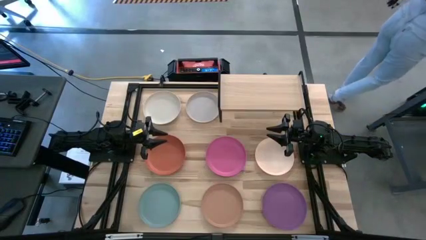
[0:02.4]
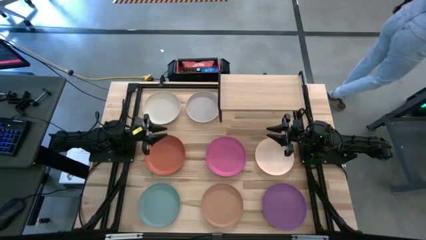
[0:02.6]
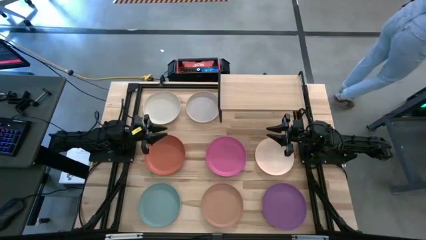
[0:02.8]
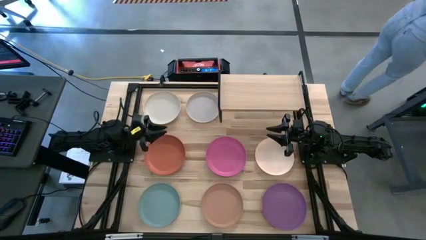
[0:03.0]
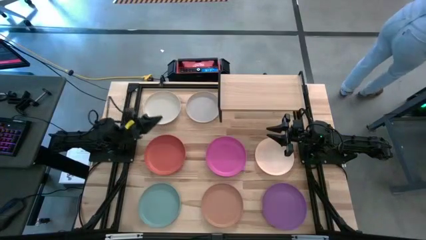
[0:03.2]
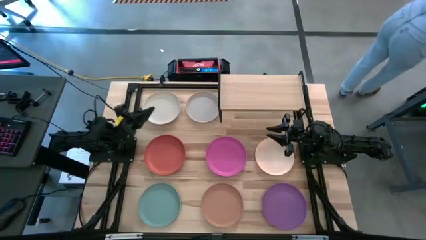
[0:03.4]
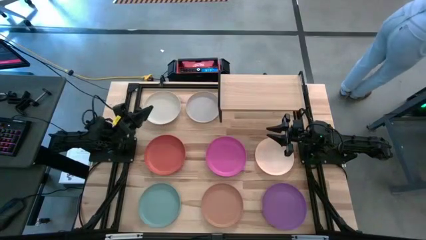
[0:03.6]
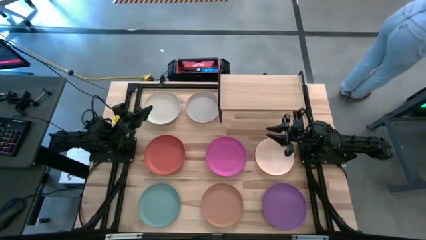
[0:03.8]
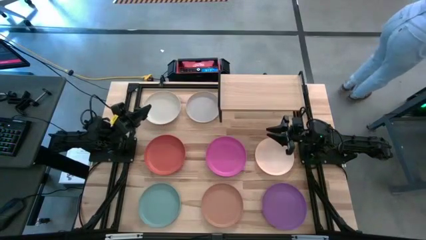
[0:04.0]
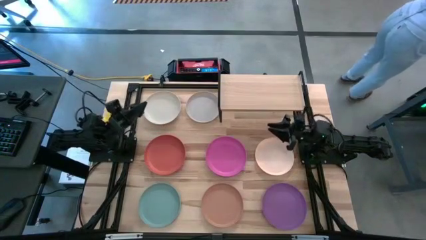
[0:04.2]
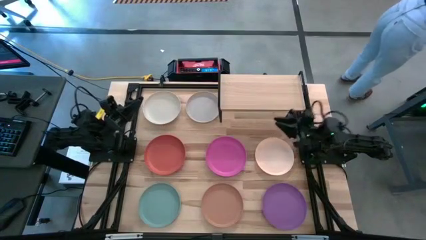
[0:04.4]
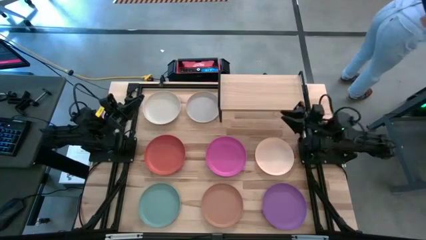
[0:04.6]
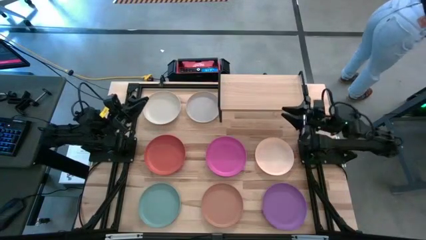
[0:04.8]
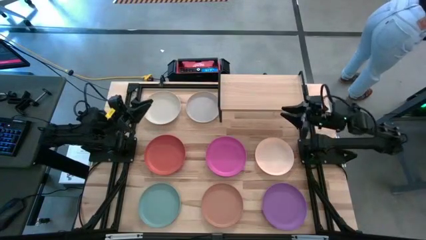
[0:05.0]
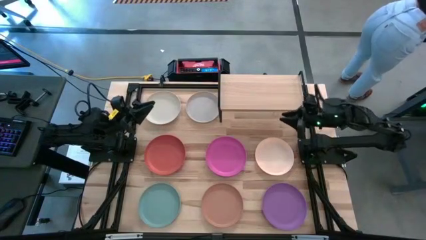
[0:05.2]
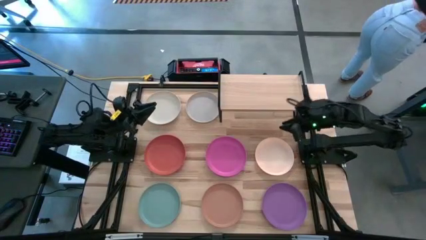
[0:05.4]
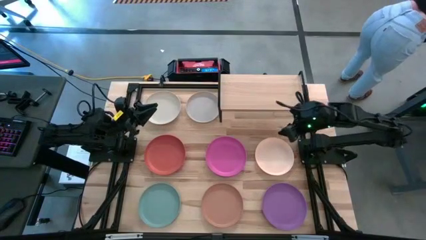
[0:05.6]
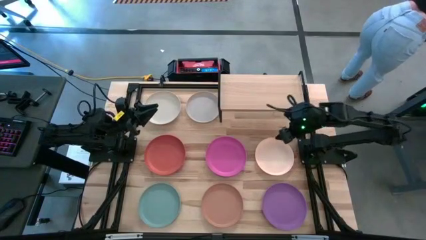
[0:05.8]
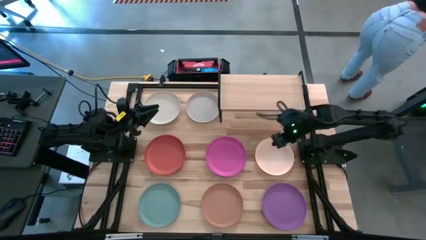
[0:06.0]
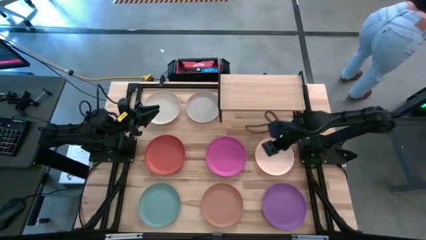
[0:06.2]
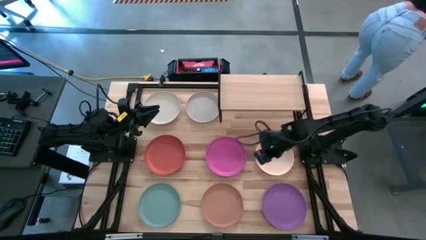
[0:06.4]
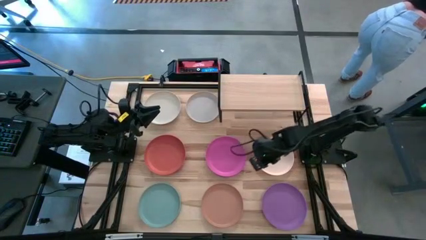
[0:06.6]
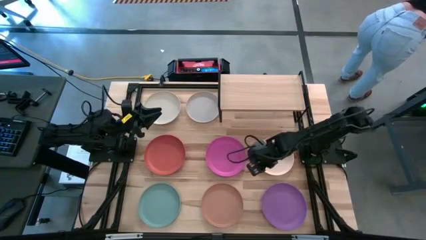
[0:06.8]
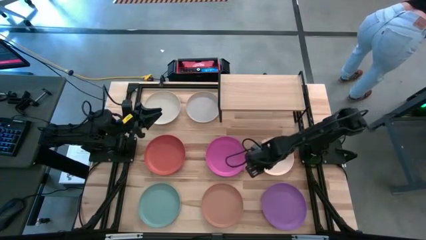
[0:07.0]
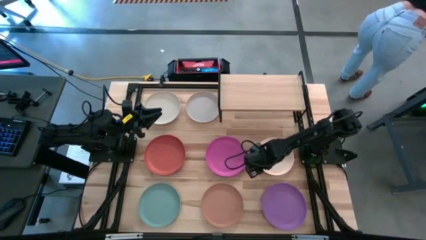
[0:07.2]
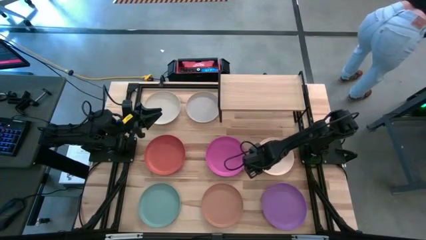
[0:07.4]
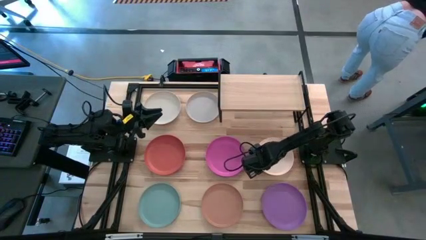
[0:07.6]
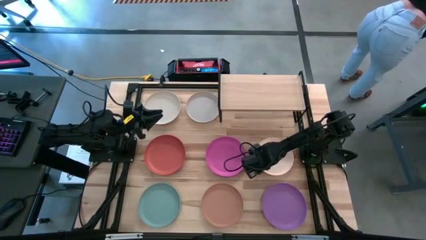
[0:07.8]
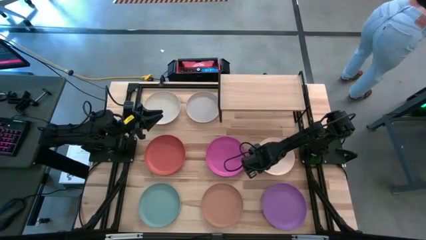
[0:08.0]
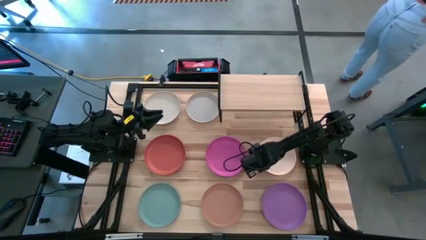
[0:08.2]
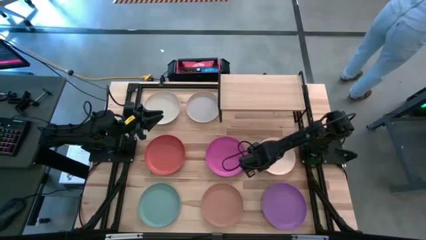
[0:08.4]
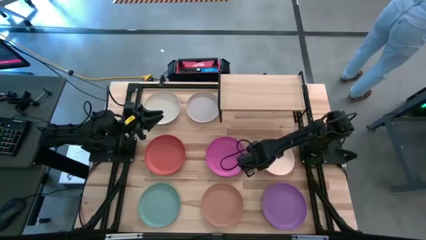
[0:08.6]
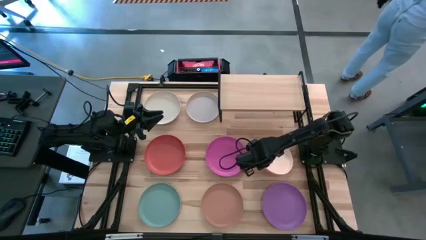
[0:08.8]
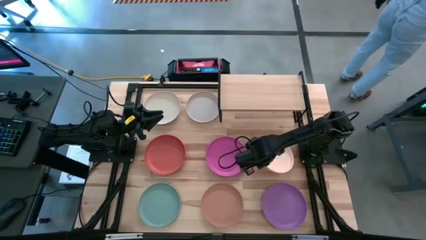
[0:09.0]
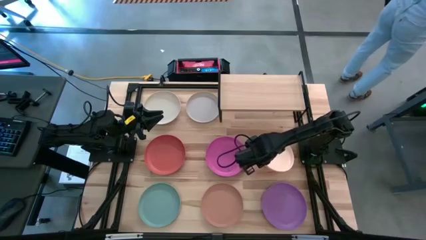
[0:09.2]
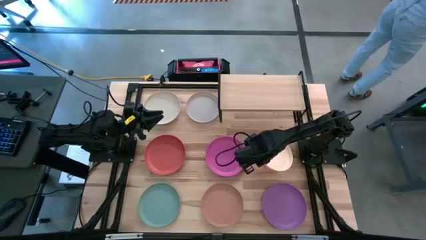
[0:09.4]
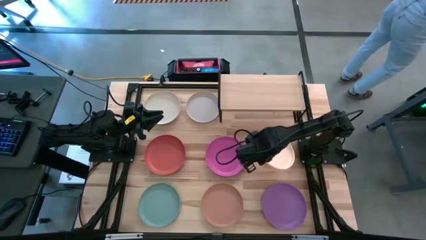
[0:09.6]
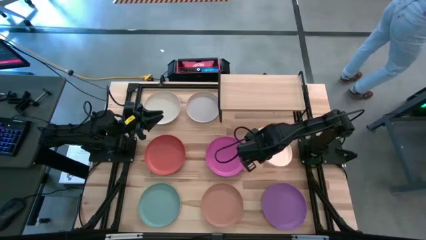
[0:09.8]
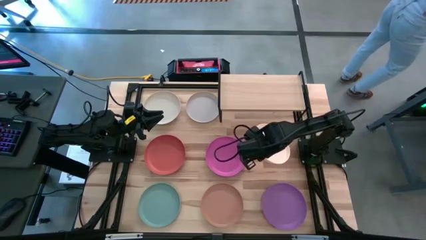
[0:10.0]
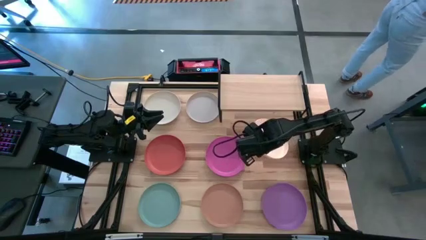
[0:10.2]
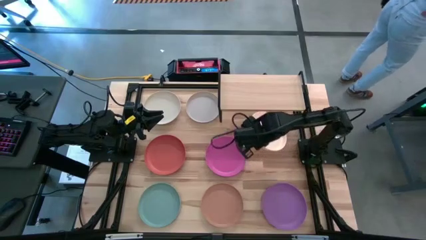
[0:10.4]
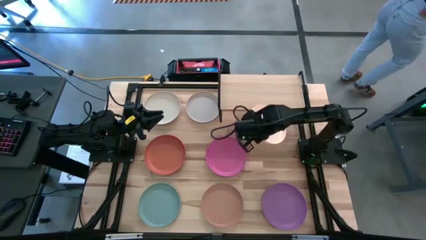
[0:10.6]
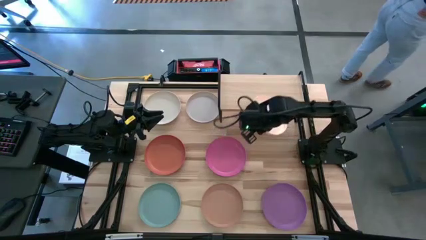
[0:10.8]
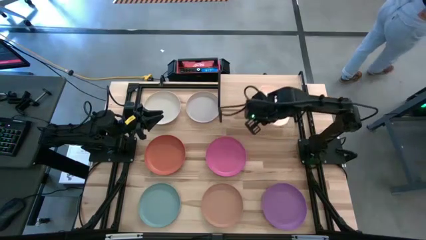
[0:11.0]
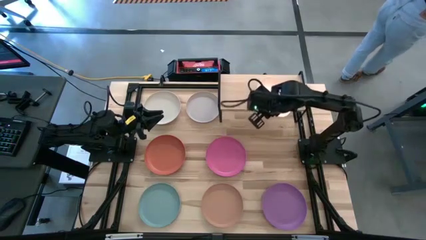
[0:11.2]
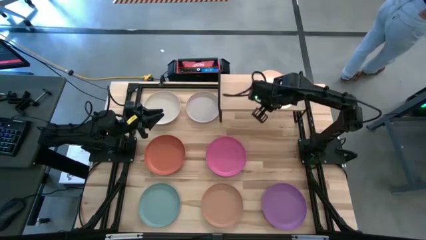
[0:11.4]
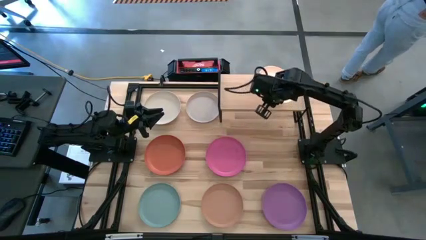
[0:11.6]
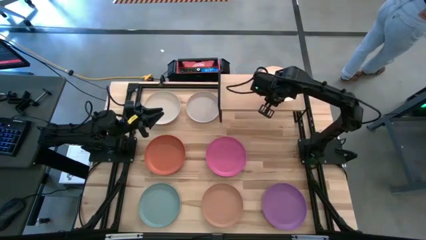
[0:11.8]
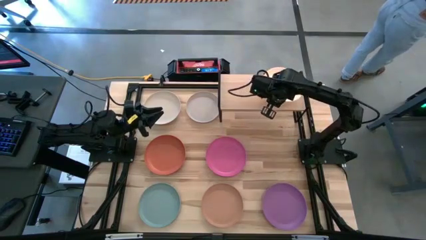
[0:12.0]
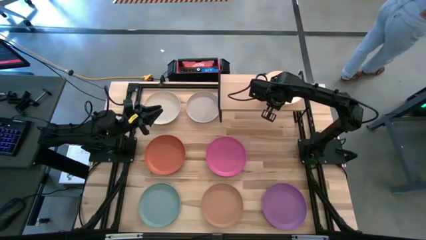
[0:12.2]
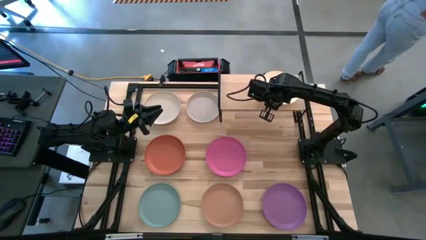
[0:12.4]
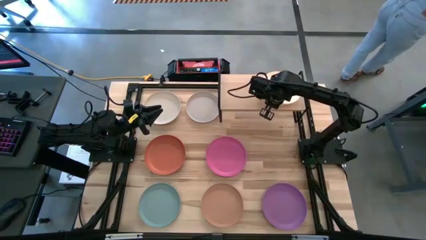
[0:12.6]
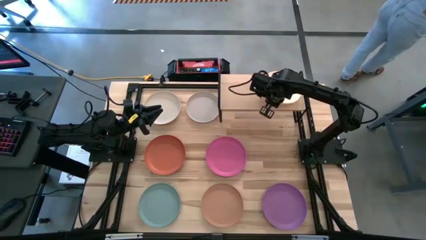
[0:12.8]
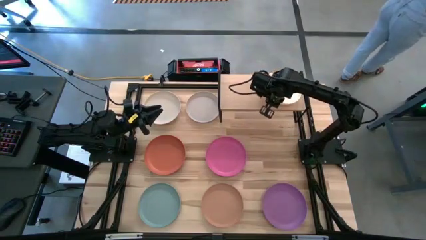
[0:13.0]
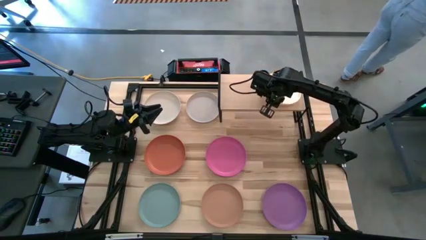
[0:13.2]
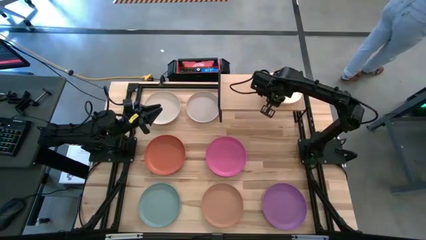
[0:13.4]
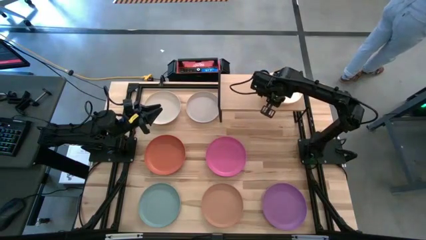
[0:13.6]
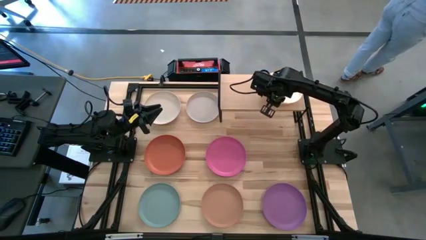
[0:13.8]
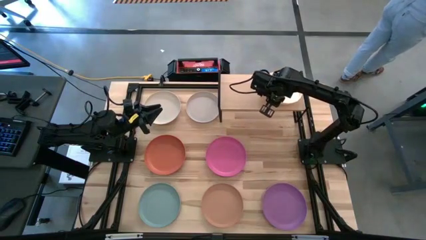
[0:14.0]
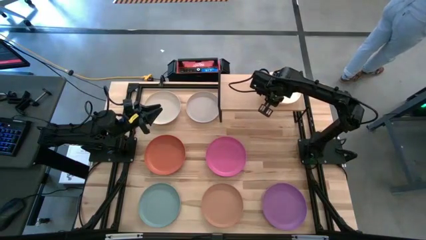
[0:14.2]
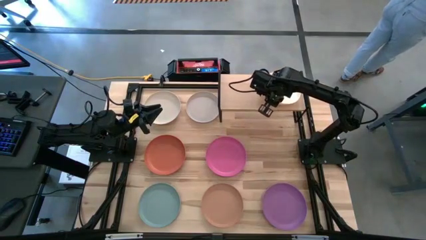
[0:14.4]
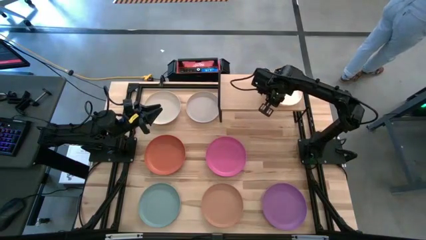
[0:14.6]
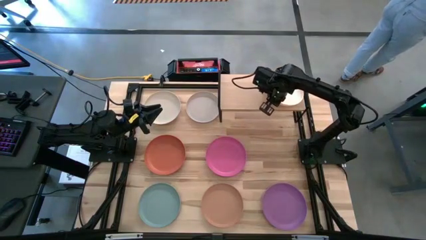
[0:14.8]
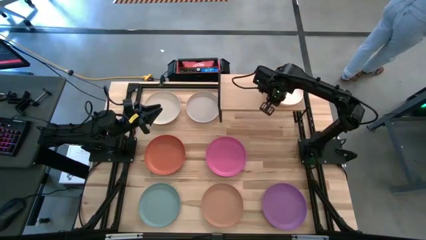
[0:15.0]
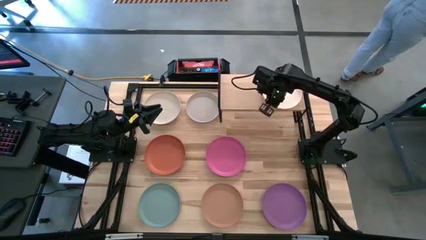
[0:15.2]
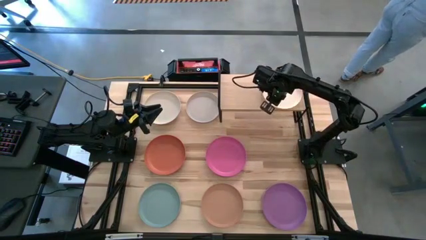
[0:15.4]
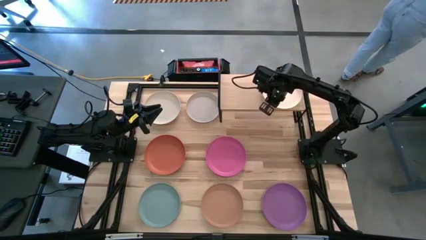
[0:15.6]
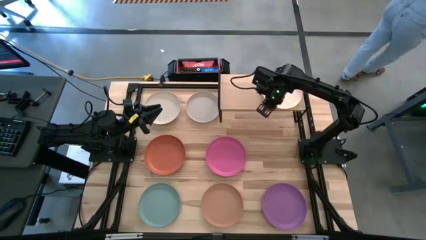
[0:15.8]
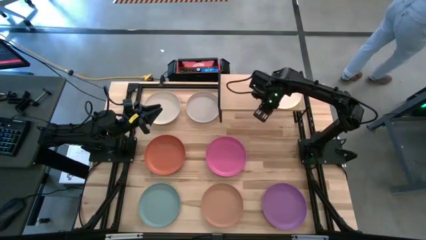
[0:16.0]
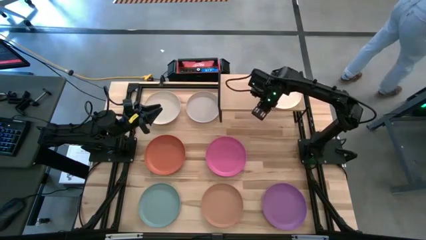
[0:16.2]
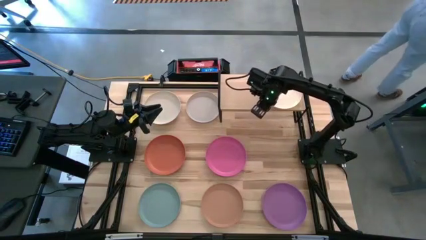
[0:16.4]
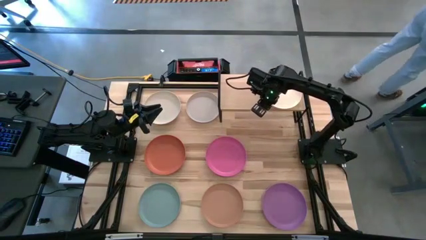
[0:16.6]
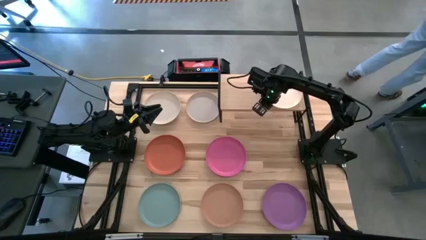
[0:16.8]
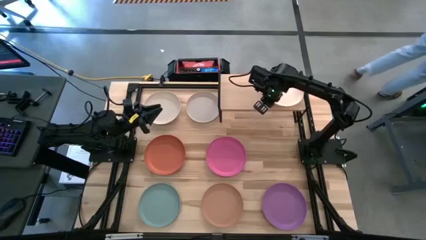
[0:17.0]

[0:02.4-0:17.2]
Task: Place and stack plates onto a shelf
Put the white plate on the shelf
